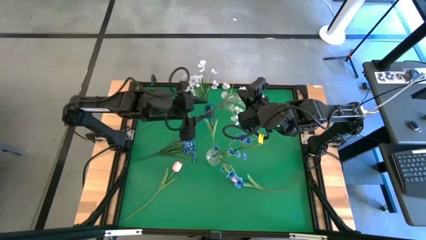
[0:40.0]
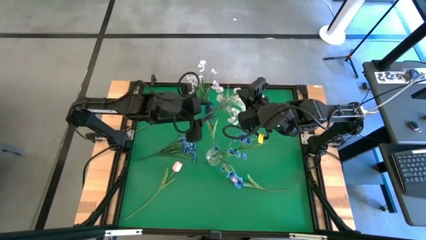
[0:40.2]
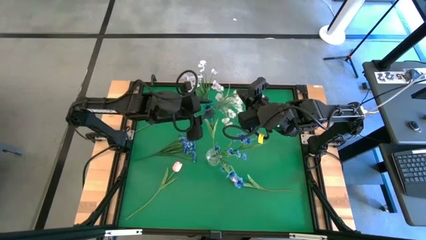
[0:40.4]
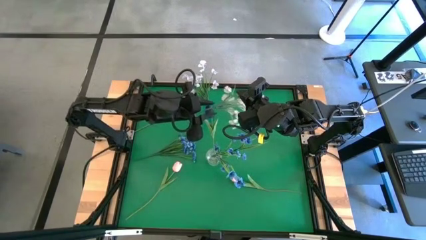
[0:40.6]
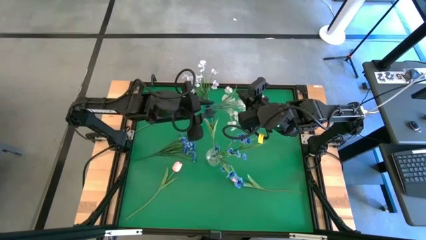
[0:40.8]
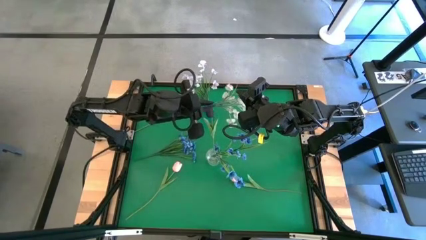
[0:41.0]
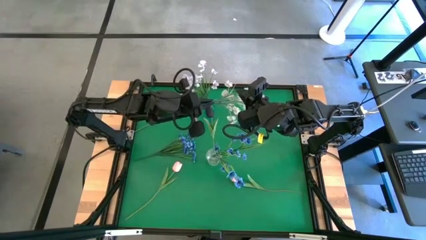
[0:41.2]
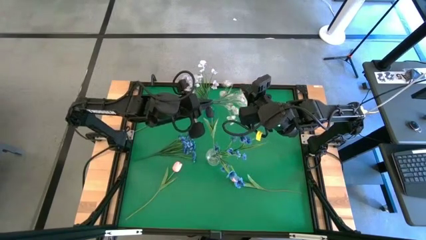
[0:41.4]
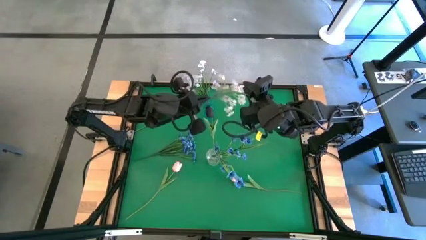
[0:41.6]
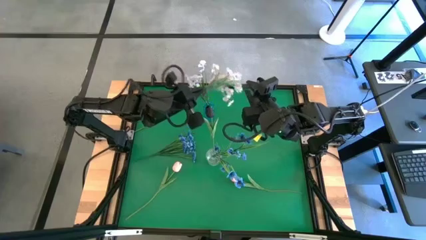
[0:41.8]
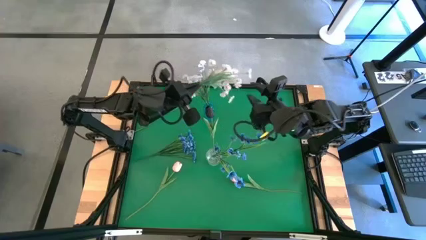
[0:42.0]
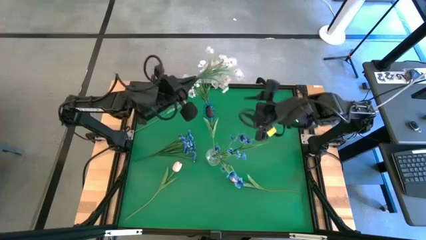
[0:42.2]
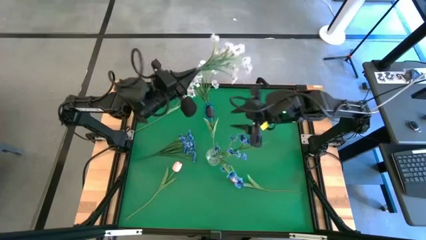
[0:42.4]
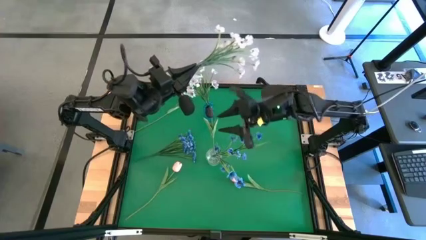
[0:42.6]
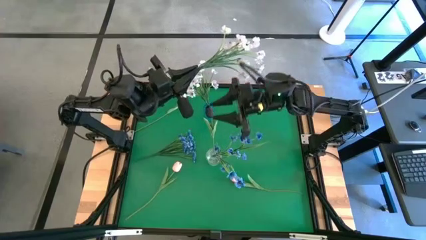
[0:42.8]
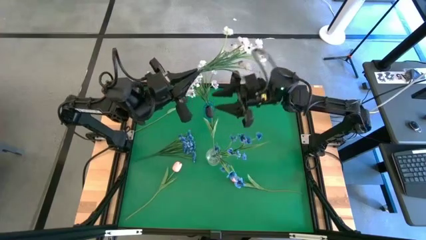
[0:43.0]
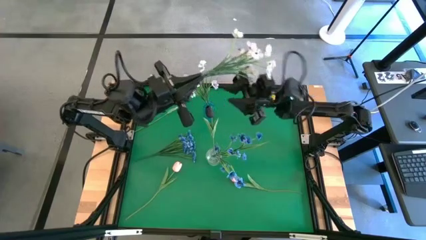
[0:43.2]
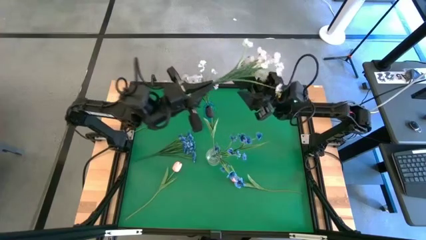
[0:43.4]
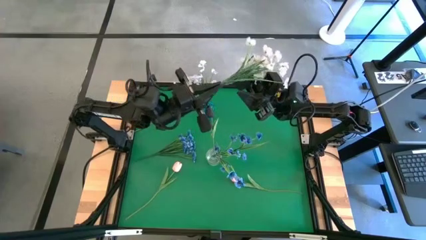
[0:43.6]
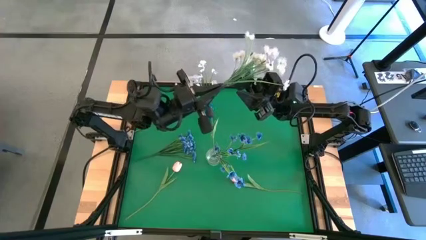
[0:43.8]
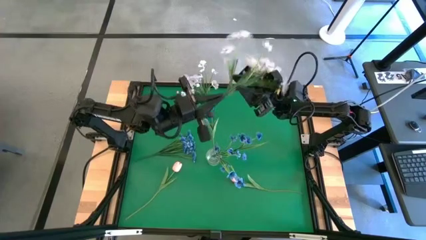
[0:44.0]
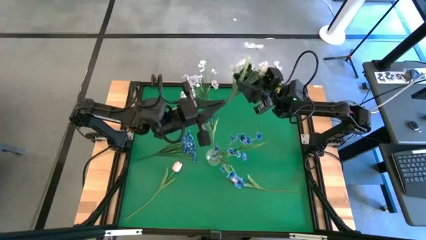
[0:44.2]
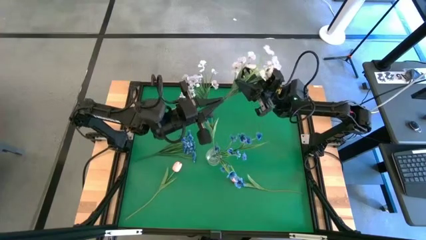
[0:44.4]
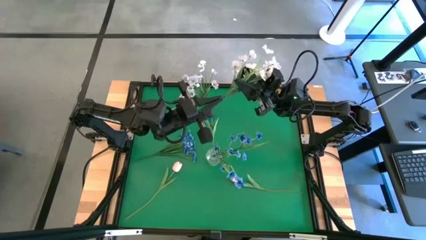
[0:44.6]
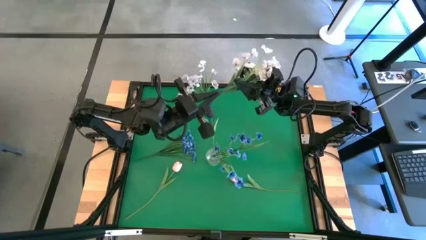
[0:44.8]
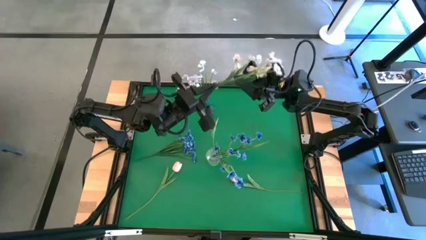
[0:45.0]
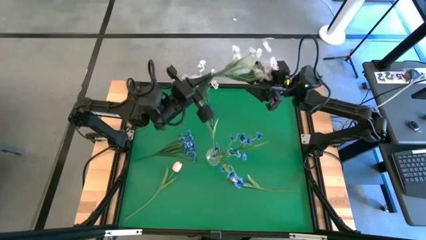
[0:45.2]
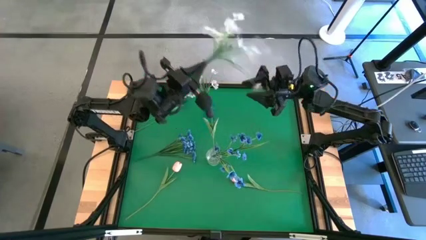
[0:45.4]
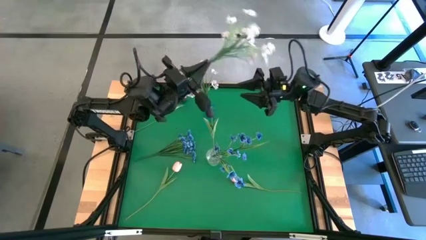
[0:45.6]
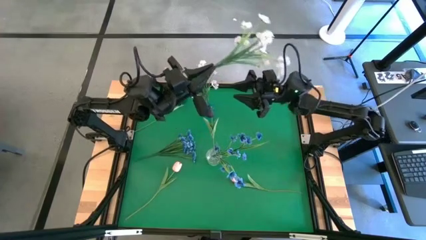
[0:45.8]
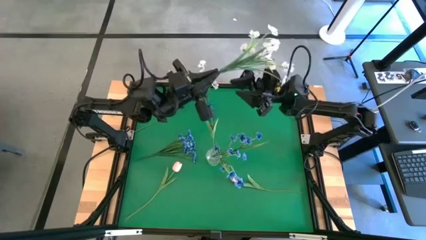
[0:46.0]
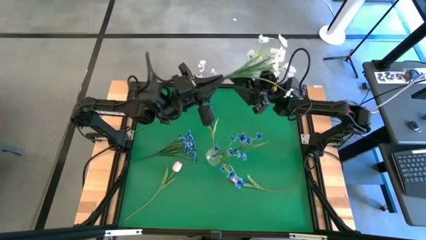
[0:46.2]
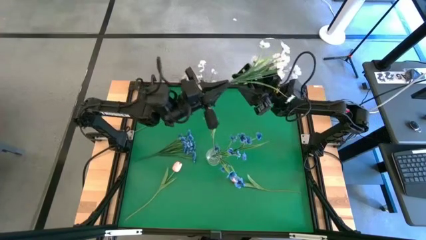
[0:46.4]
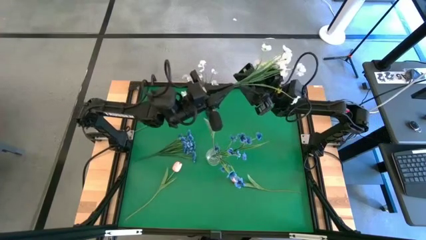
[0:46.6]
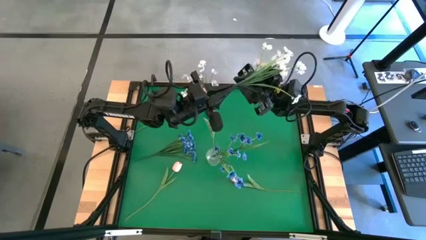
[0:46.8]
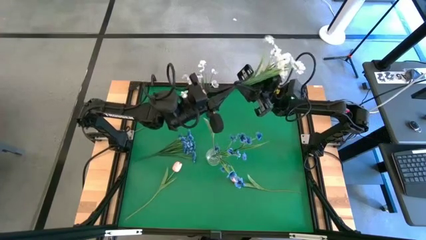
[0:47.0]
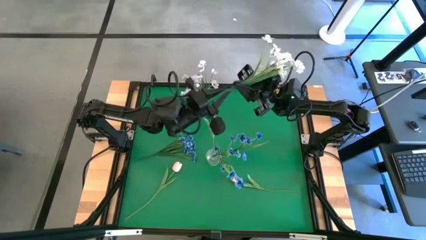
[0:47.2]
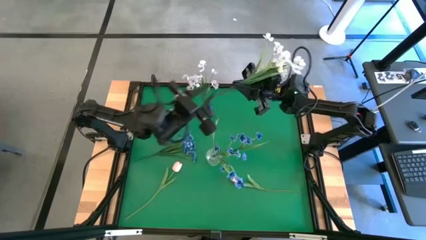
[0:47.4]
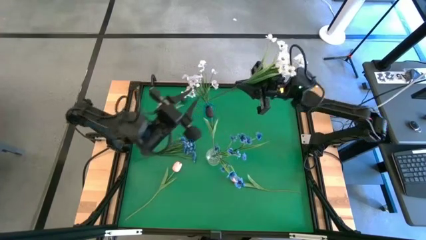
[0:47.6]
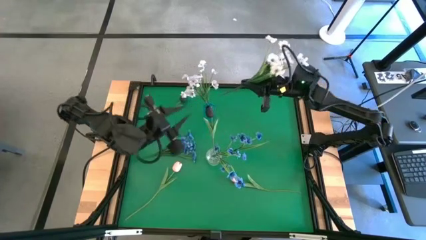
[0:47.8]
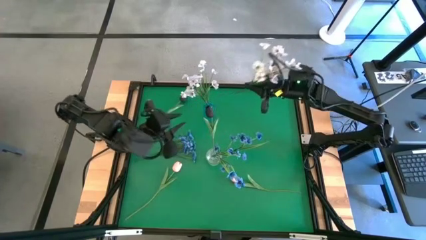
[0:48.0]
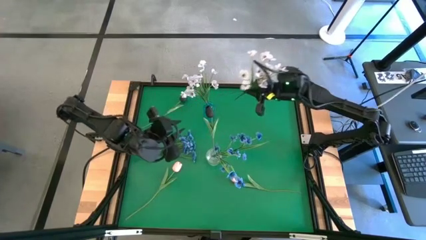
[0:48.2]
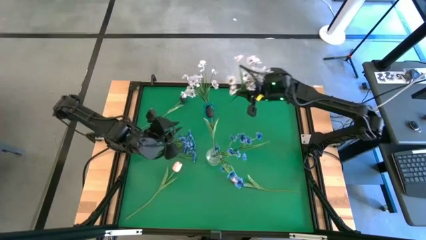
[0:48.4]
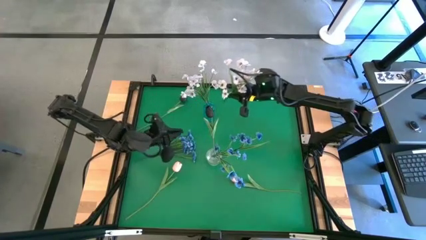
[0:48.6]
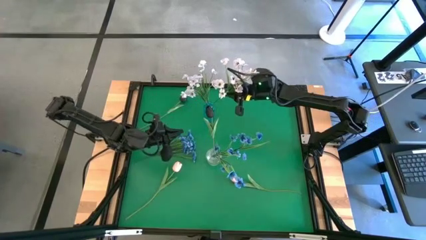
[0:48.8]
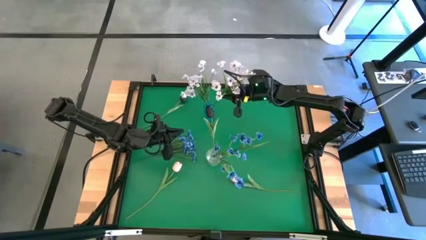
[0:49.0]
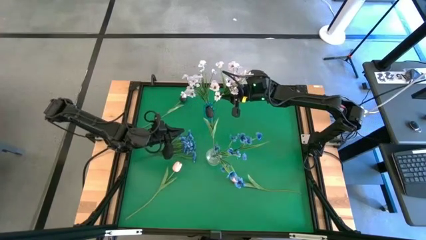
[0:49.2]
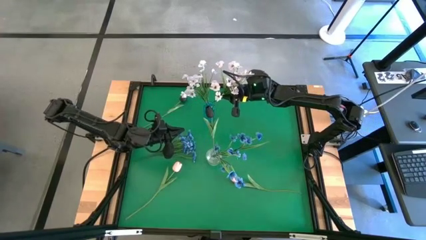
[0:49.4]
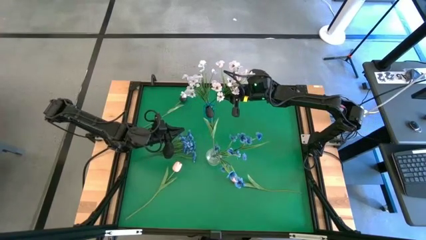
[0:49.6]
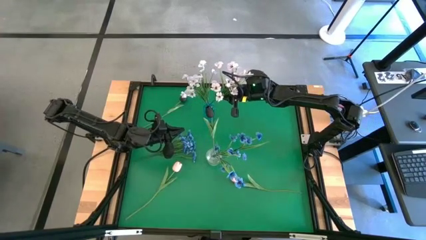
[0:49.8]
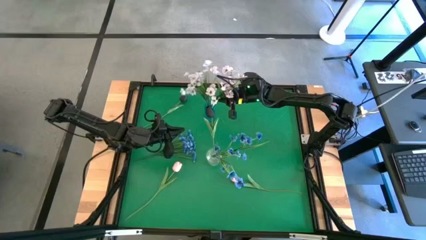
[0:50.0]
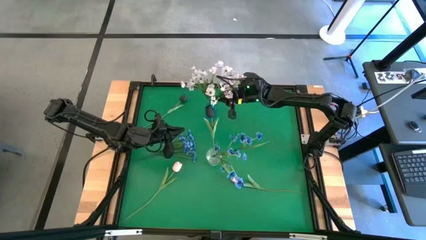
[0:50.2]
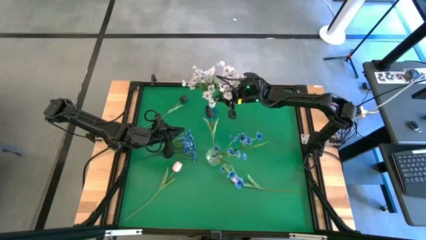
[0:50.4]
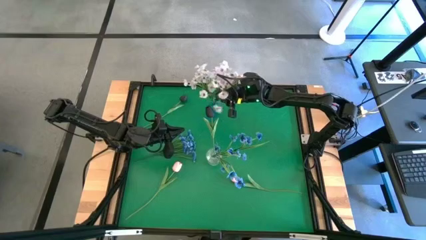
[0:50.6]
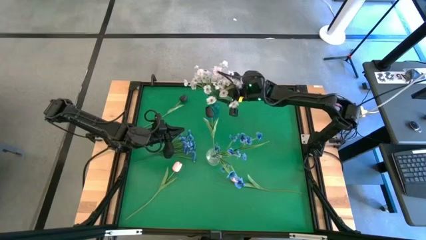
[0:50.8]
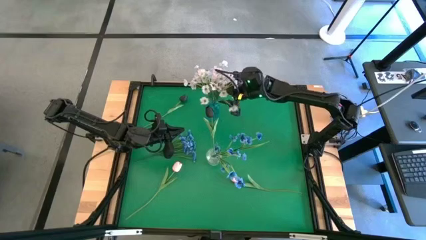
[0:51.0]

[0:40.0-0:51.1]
Task: Sort flowers into vase by color
Put the white flowers into the blue vase

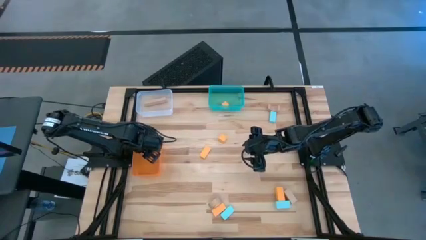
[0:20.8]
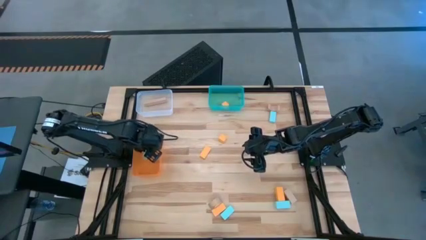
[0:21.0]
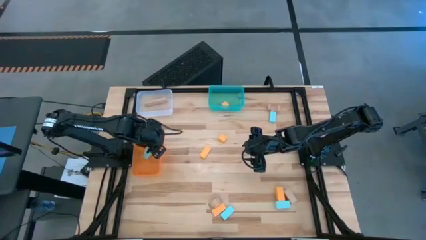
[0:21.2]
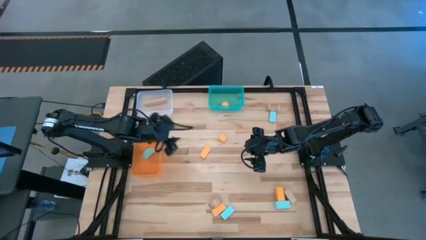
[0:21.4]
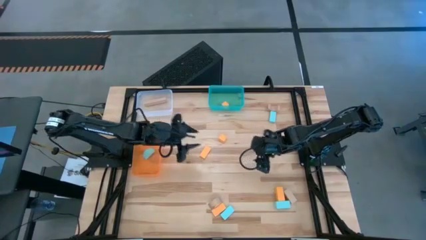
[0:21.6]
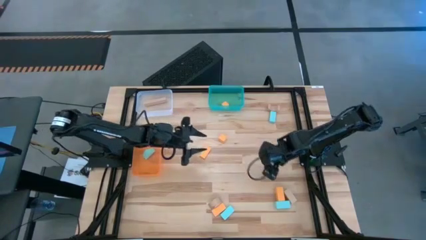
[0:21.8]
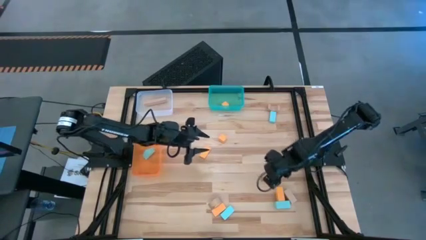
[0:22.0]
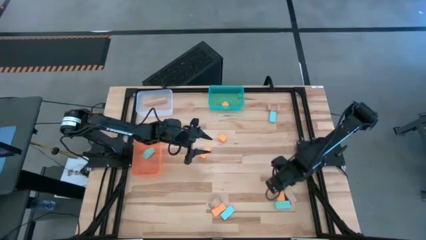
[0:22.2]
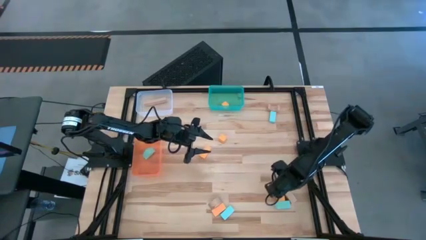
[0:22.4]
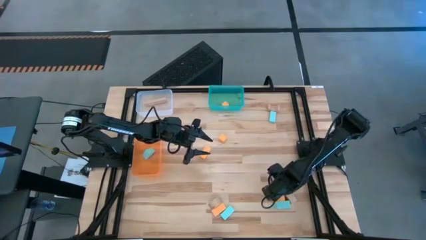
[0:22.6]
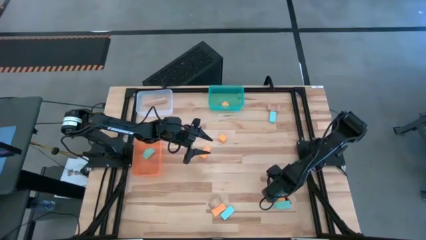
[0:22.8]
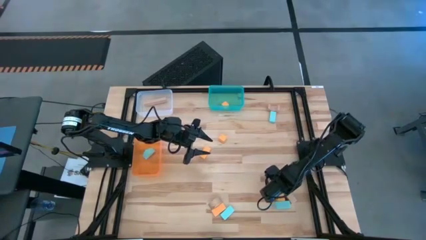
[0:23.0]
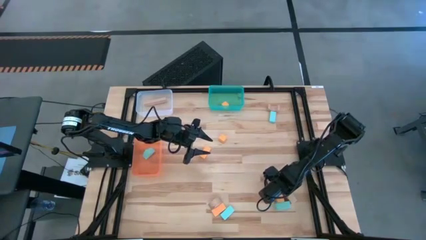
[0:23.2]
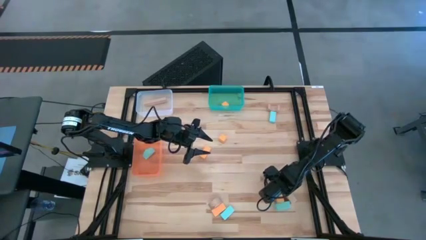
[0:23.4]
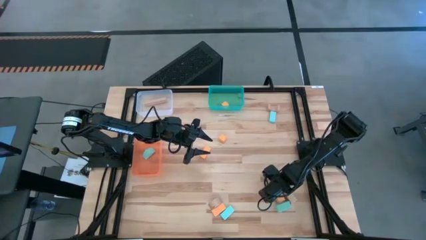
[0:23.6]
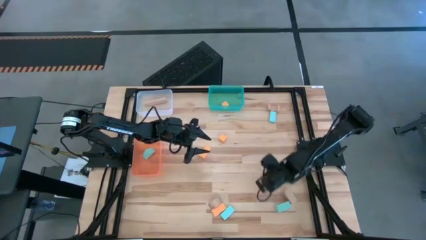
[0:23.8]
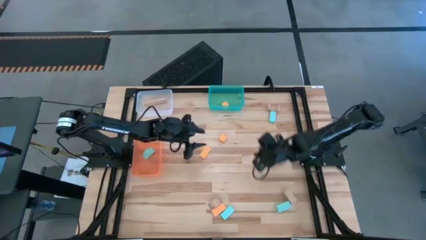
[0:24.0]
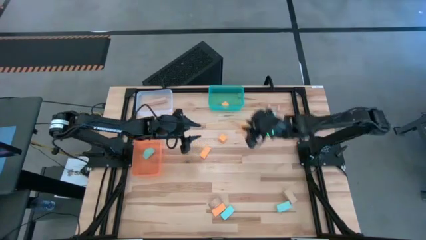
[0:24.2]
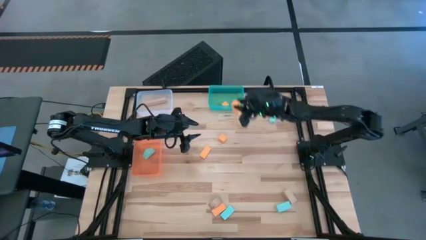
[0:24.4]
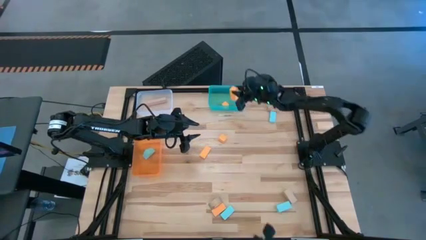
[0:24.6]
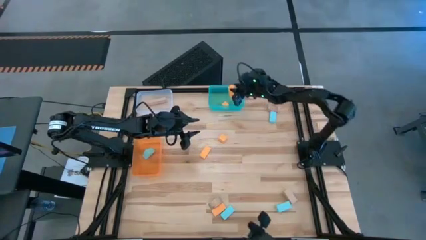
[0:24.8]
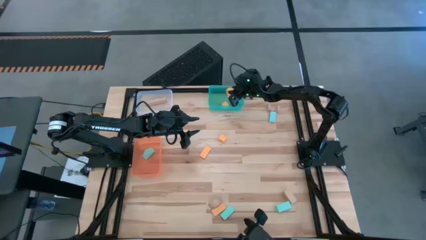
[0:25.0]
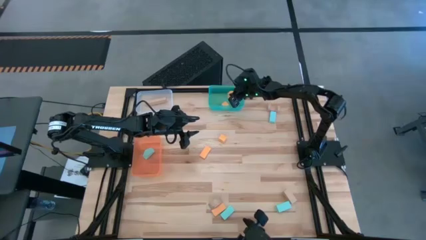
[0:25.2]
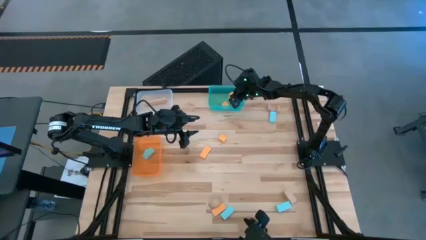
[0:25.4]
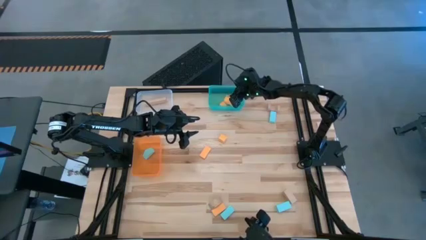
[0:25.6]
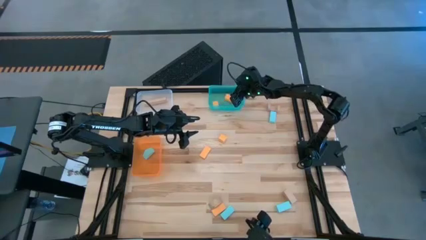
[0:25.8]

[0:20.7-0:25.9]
Task: Sort & place blocks by color
Put the yellow block into the green bin
